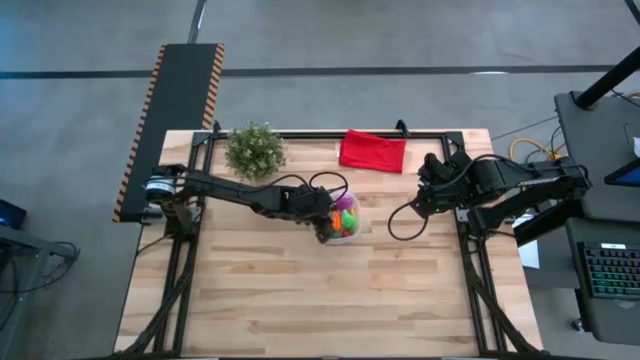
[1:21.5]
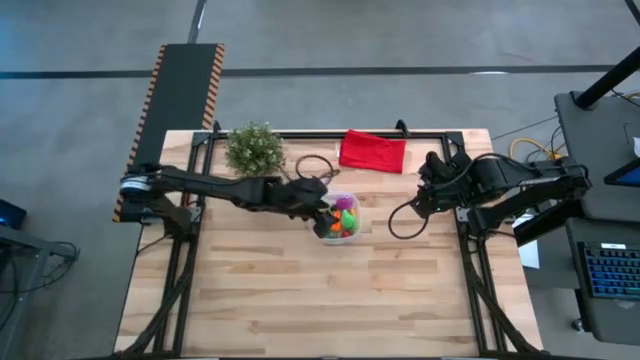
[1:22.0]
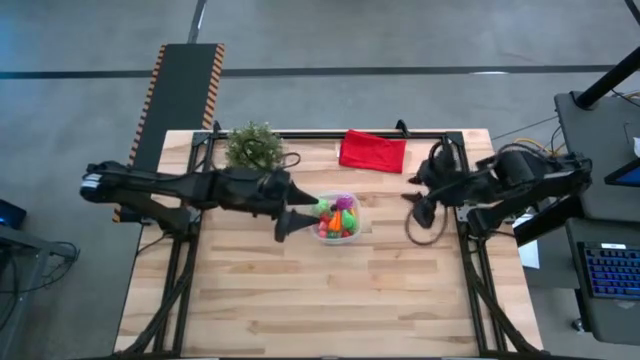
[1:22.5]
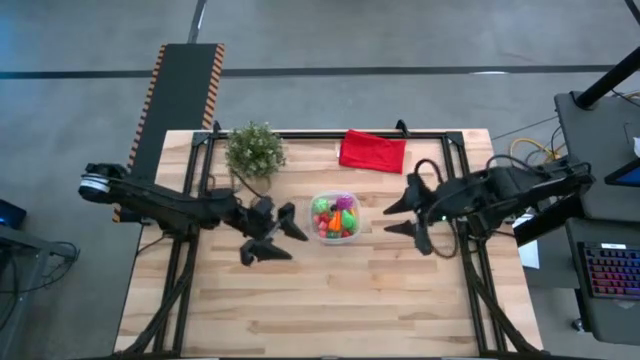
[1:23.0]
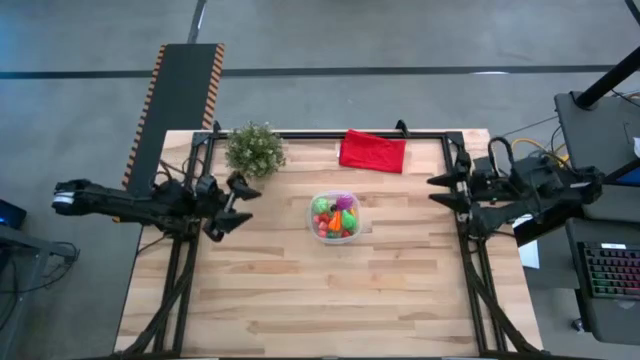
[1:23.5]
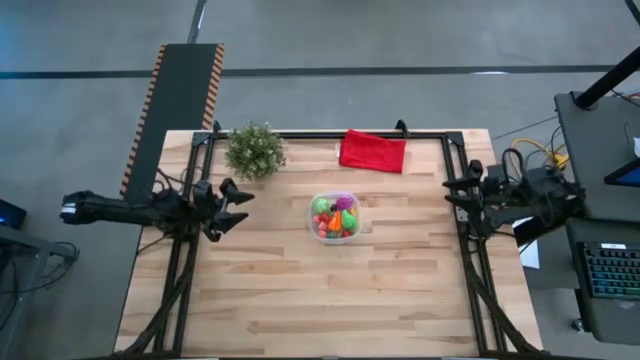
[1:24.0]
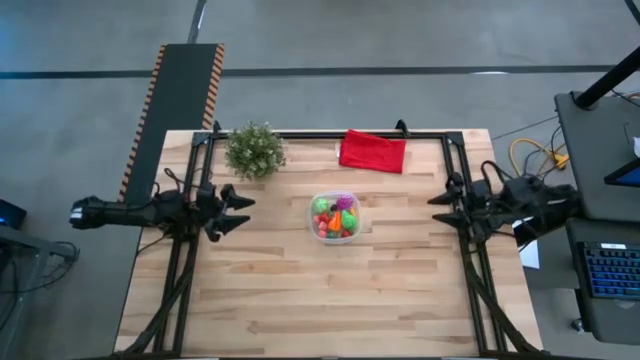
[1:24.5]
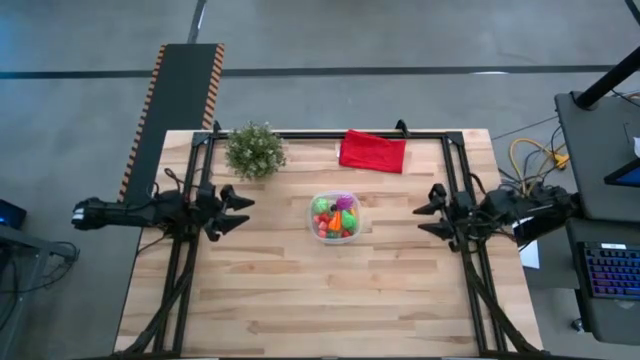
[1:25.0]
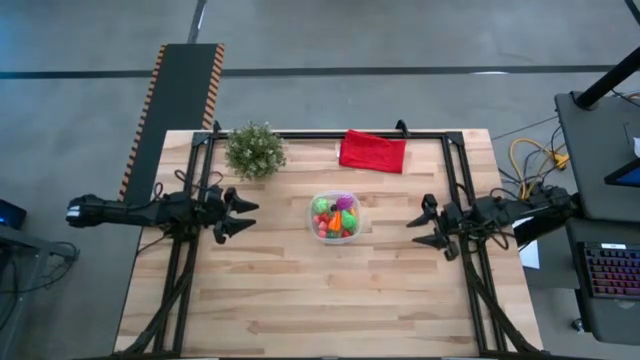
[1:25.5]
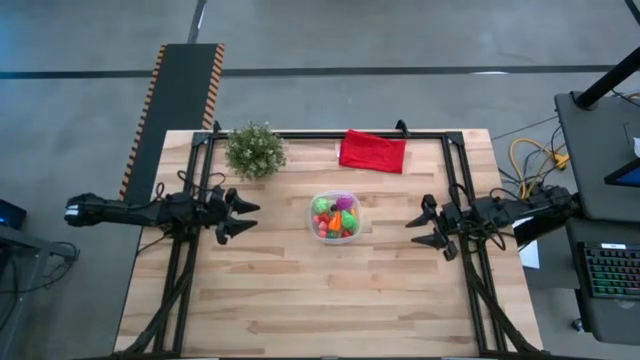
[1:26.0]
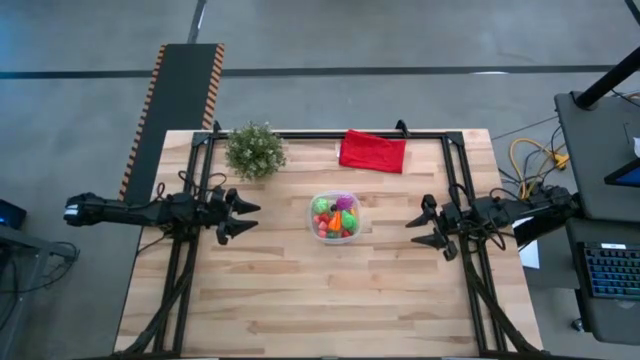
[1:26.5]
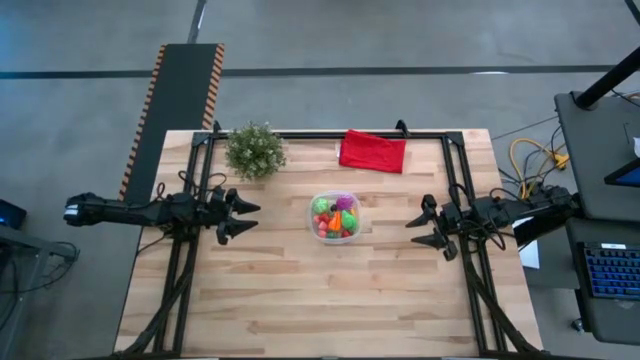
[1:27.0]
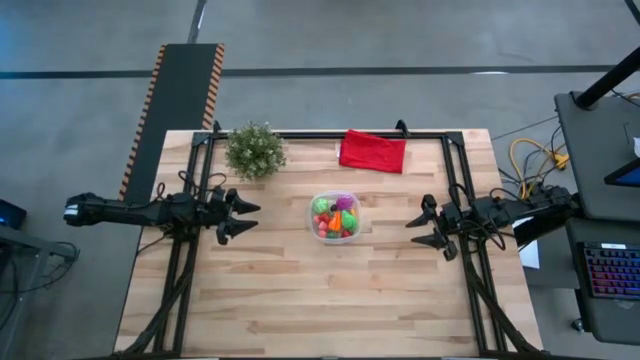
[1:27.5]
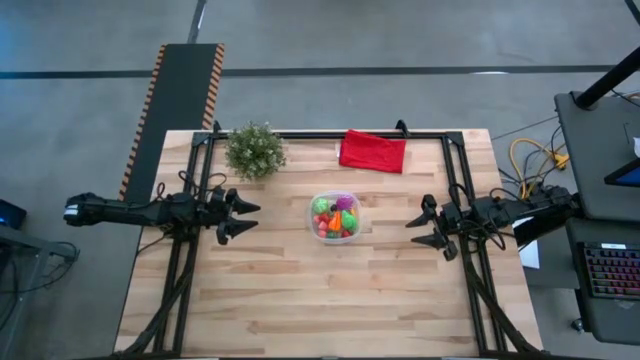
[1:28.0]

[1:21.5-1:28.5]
Task: Pick and placing Produce into tupperware
Return to Home Position

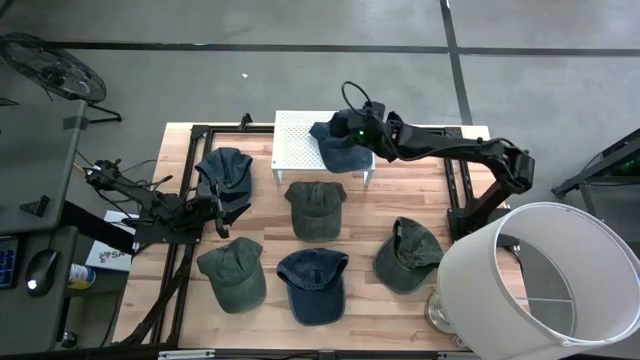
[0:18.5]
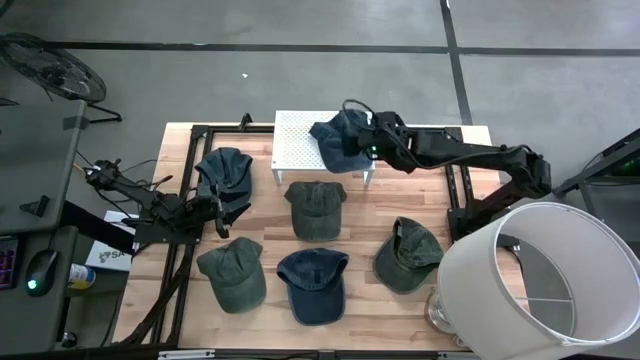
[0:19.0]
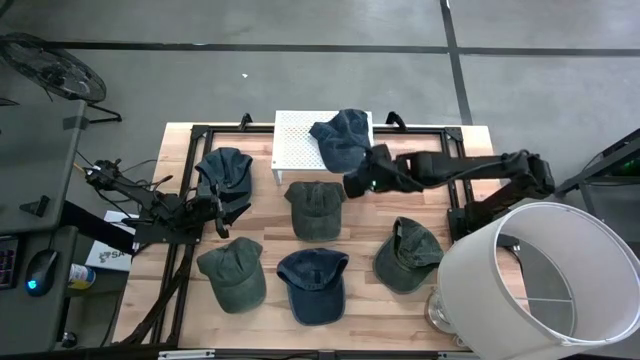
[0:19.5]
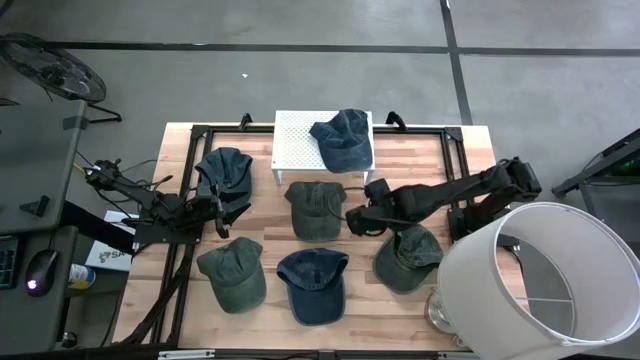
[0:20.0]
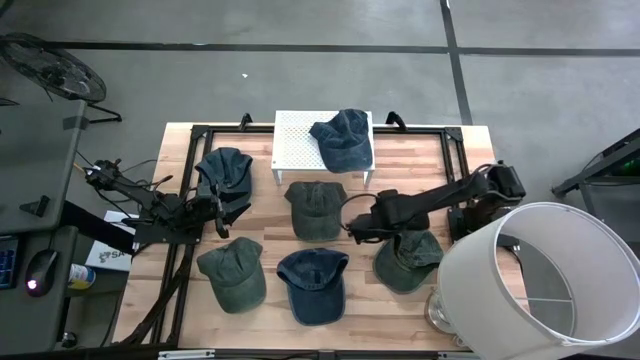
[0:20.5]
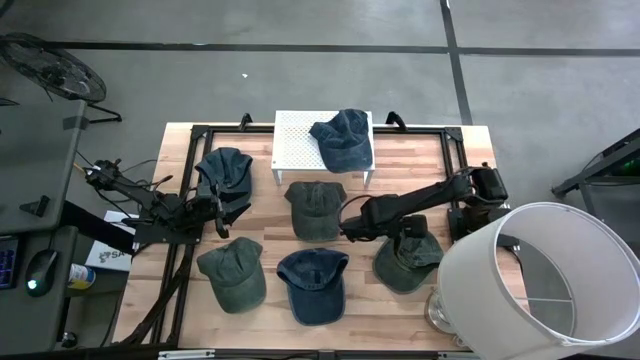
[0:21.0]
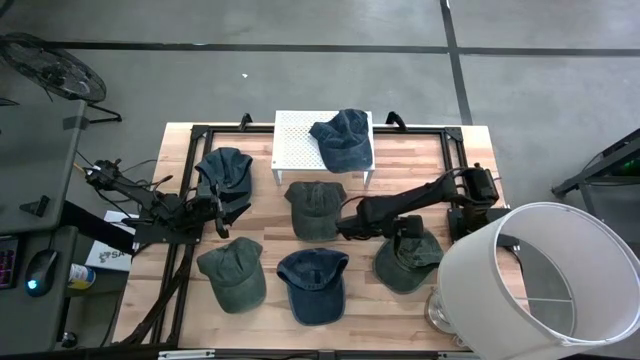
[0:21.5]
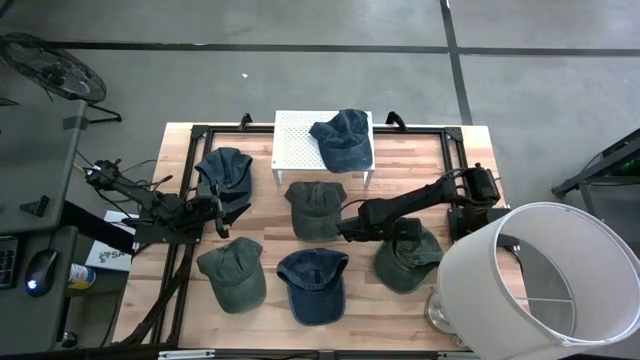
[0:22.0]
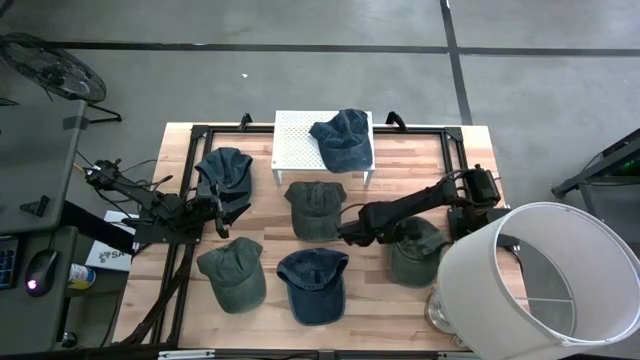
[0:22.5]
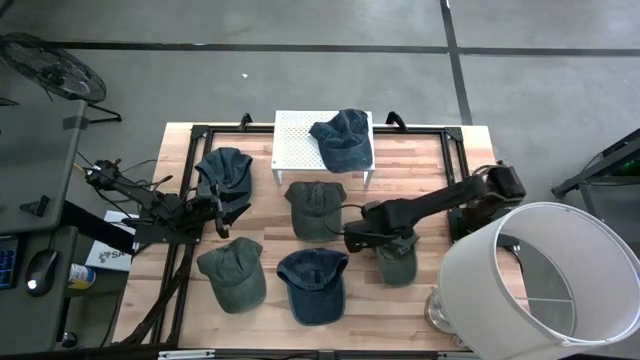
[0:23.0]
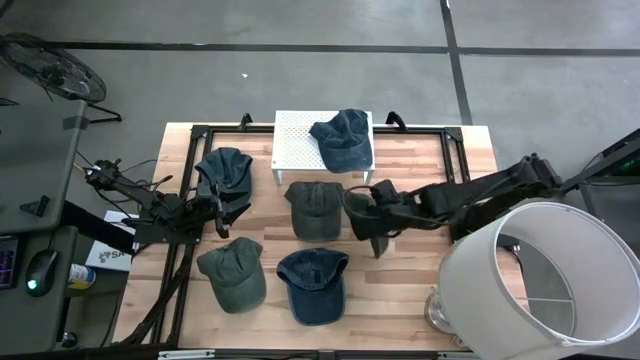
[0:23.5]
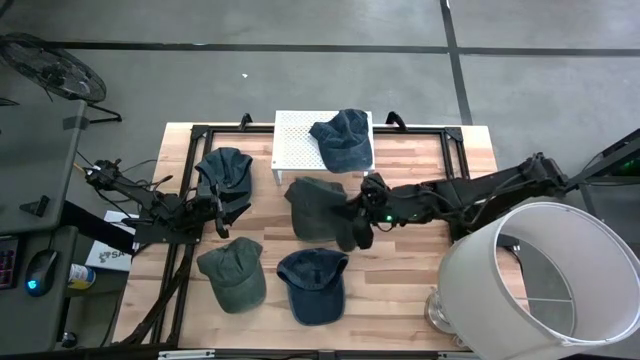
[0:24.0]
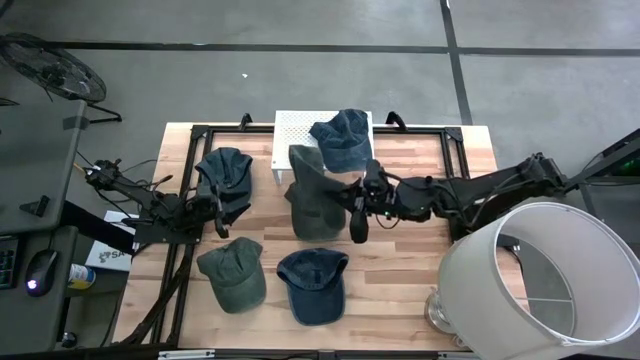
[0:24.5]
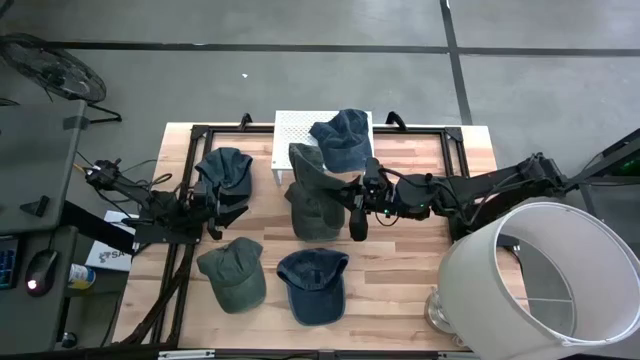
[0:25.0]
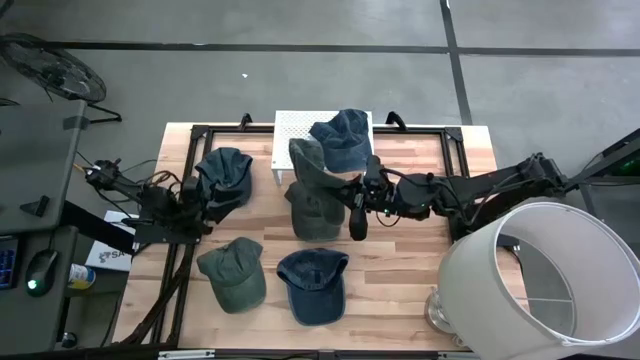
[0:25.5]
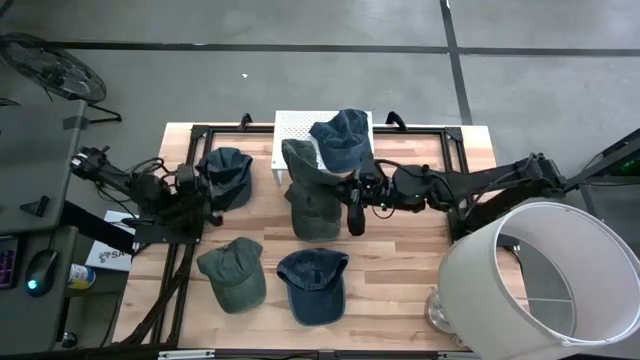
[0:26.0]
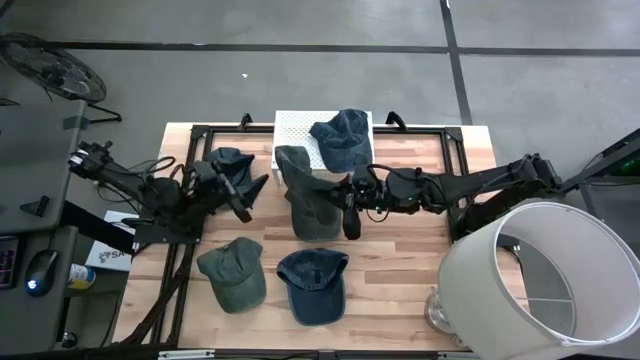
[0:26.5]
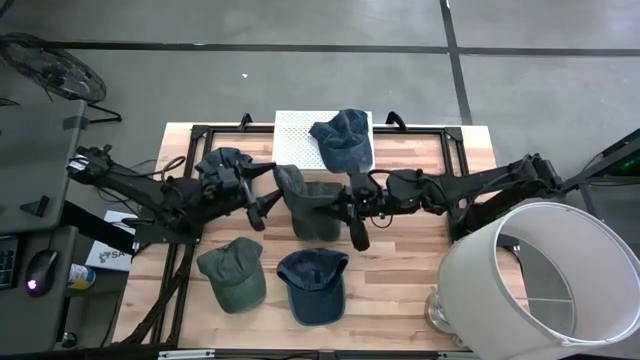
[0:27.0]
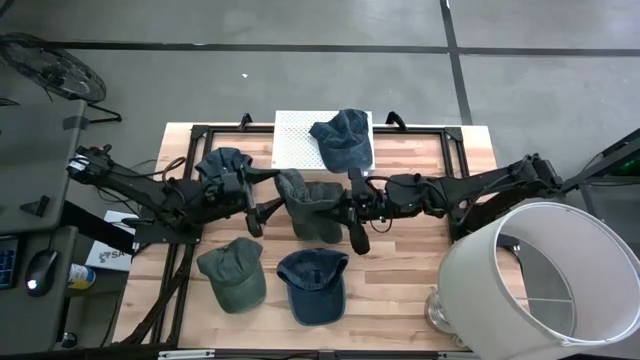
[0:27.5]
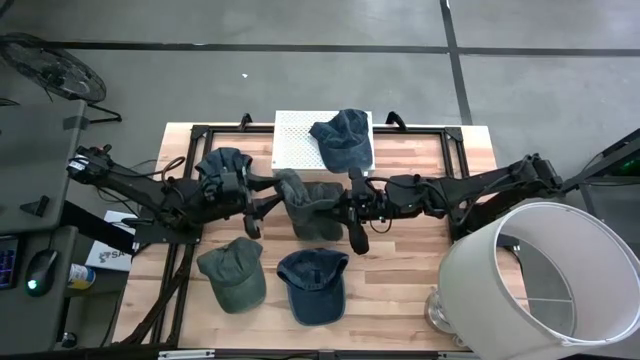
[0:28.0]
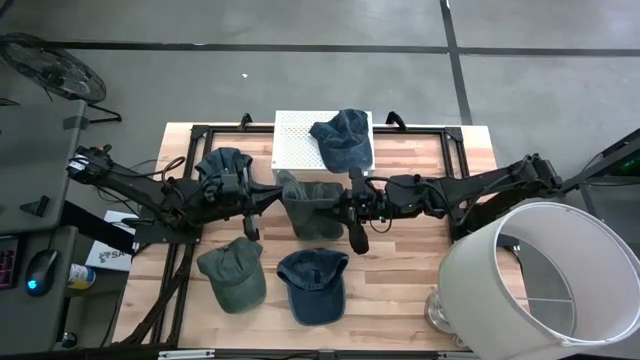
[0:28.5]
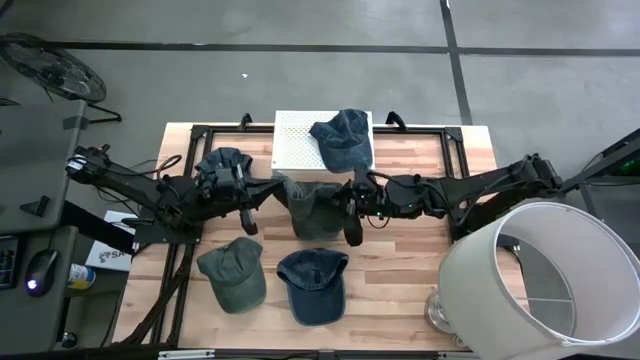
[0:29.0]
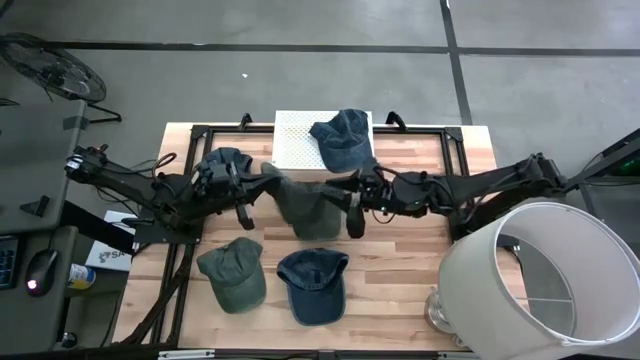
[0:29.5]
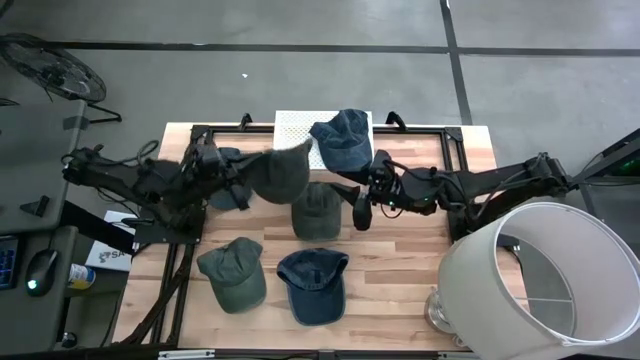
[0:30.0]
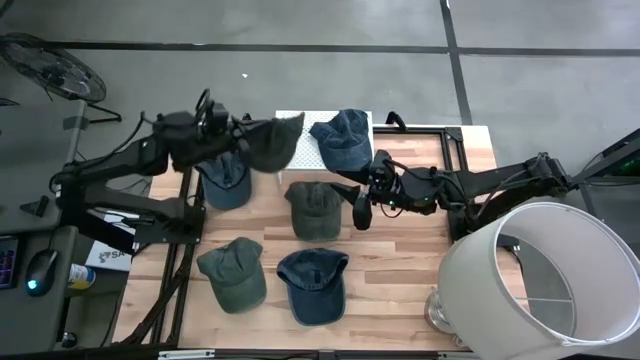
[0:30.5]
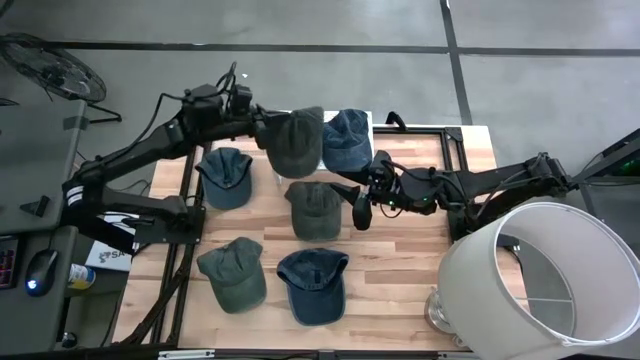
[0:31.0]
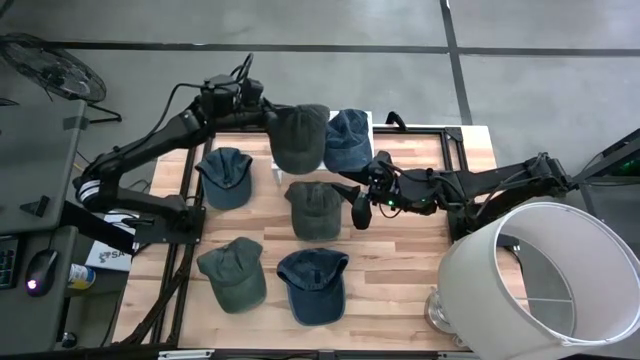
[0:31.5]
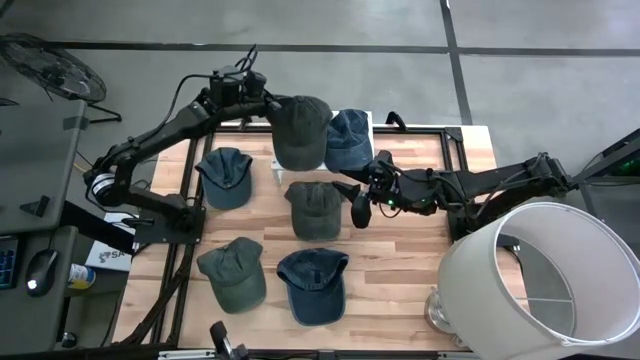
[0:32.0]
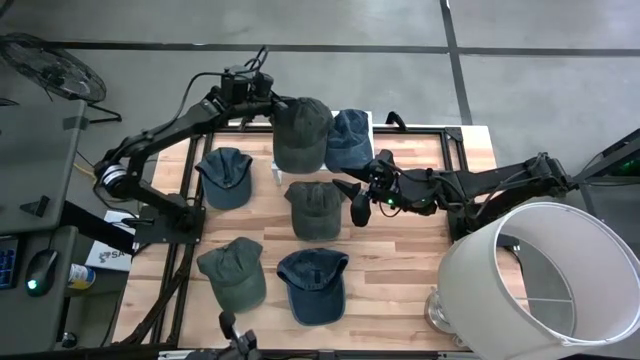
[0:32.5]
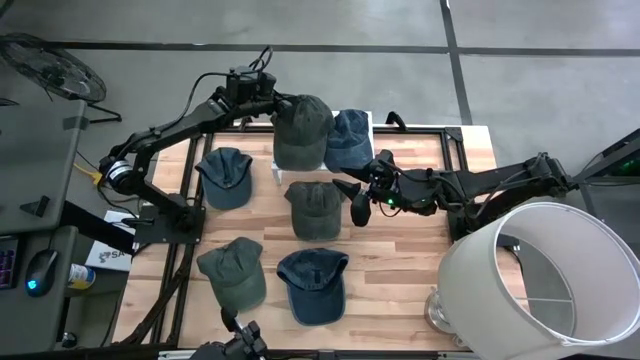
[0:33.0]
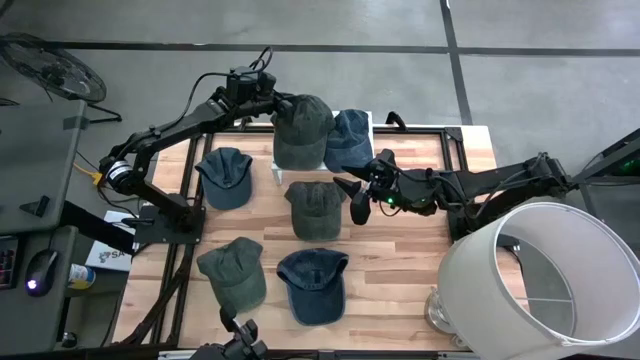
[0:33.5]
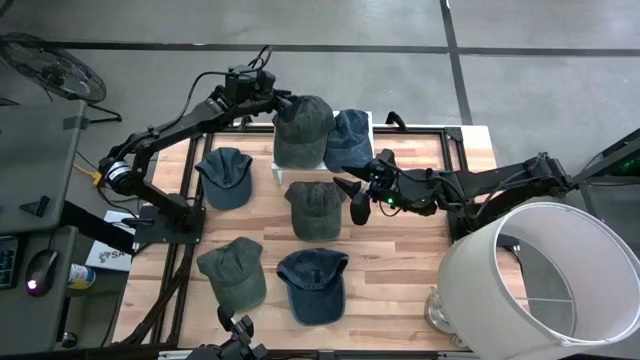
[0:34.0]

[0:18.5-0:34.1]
Task: Pick & Place hat
Put the bottom right gray cap on the shelf
